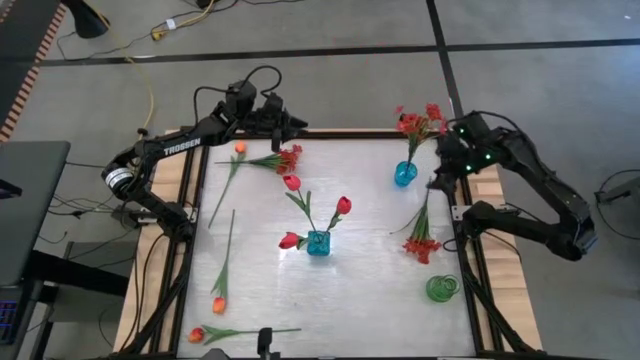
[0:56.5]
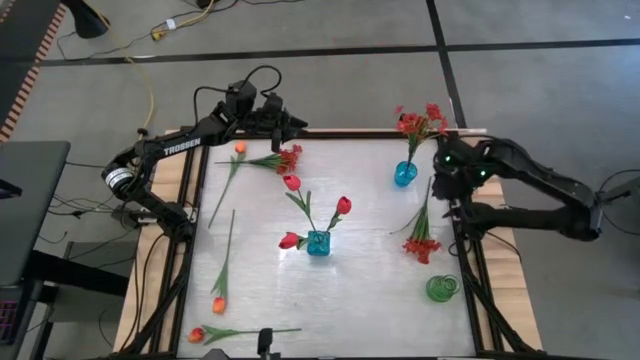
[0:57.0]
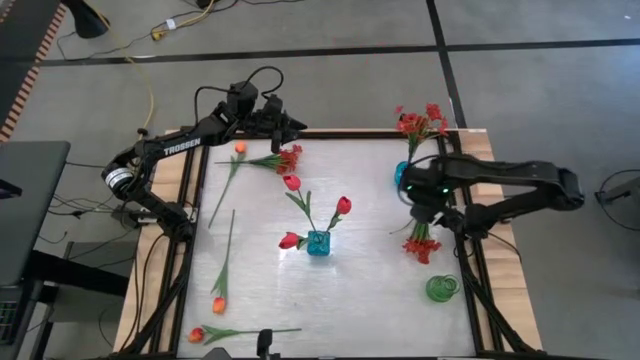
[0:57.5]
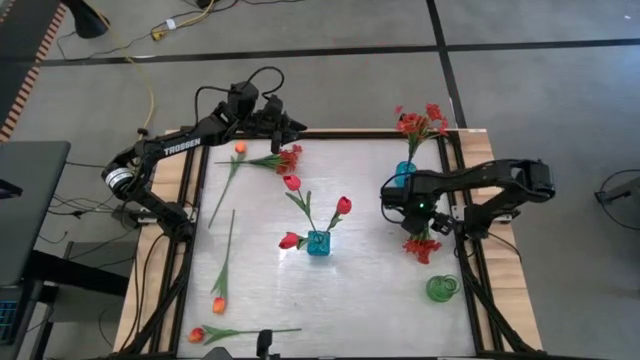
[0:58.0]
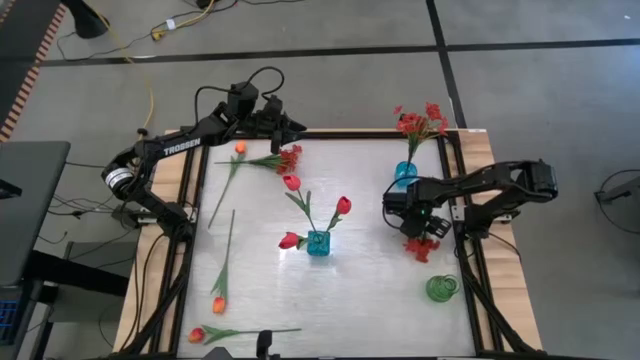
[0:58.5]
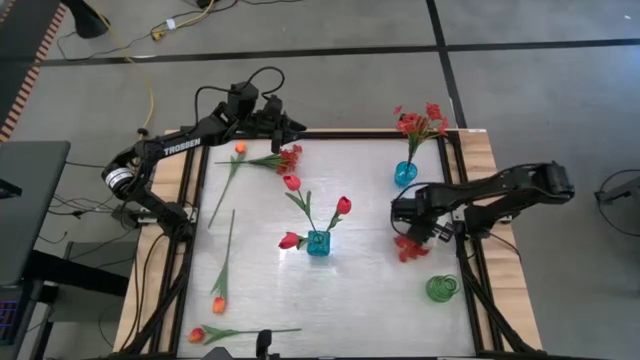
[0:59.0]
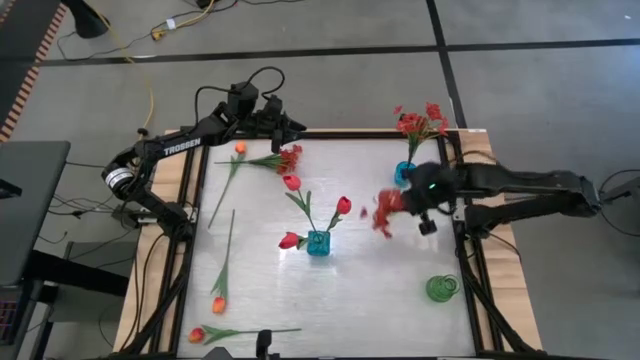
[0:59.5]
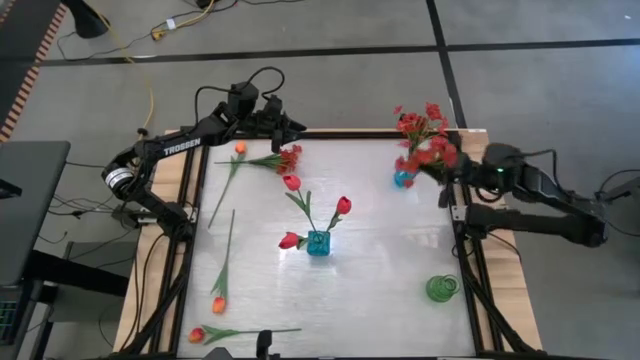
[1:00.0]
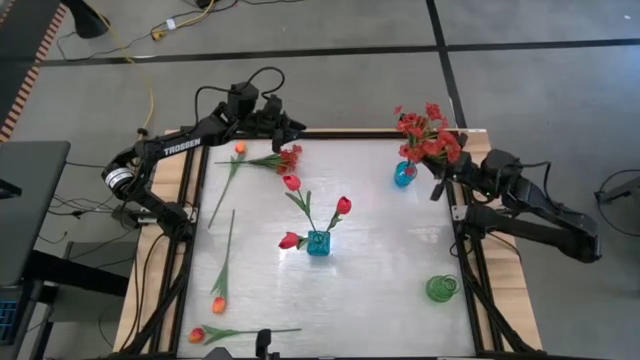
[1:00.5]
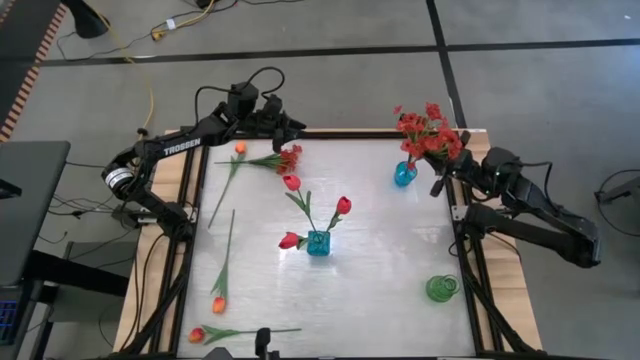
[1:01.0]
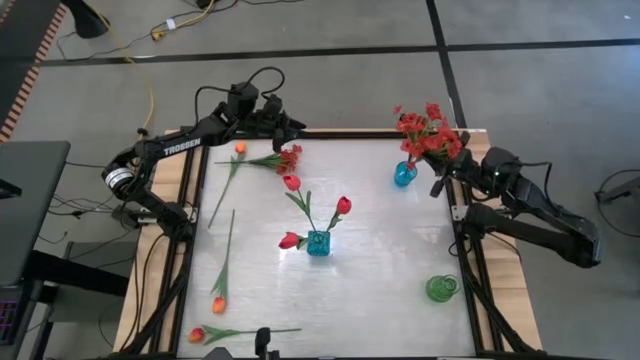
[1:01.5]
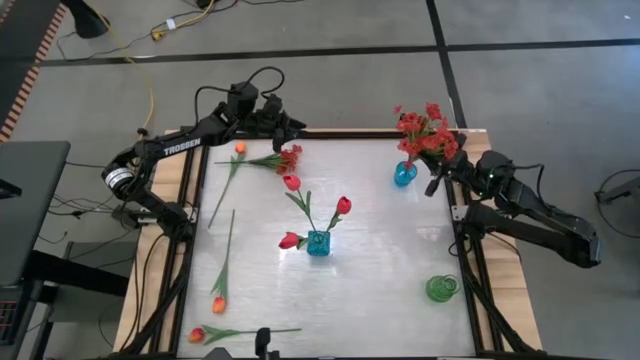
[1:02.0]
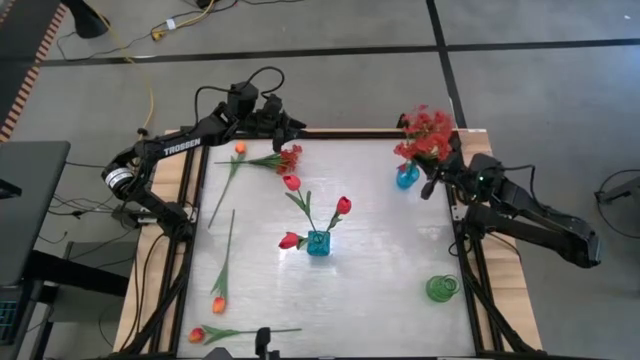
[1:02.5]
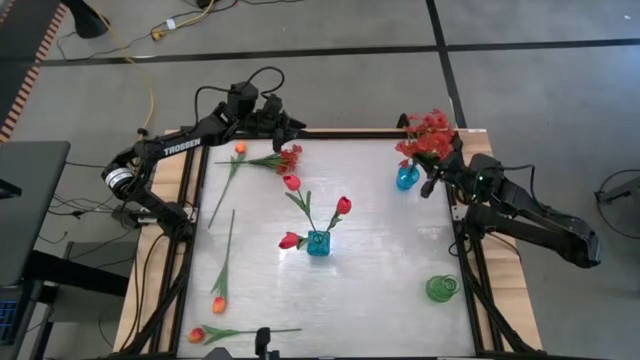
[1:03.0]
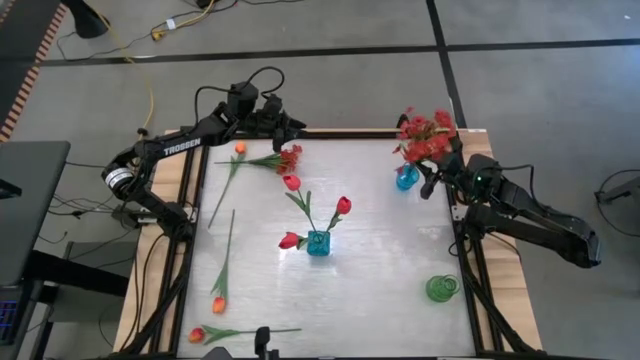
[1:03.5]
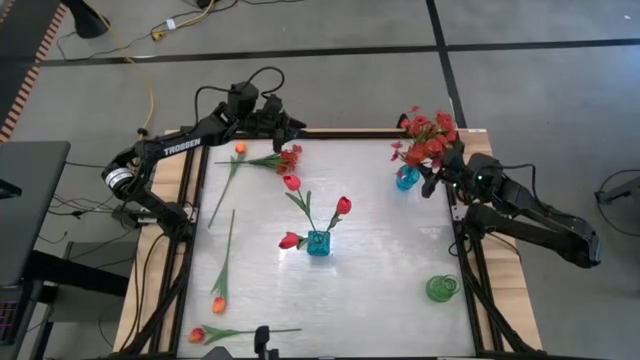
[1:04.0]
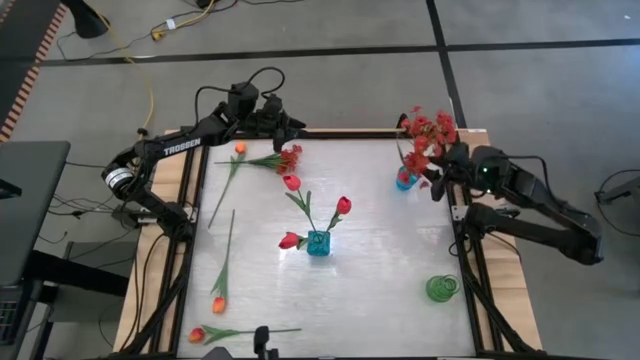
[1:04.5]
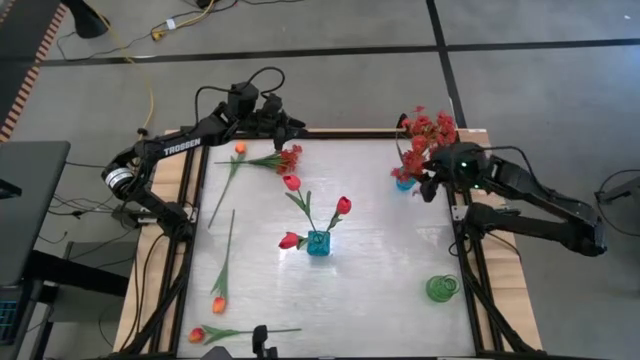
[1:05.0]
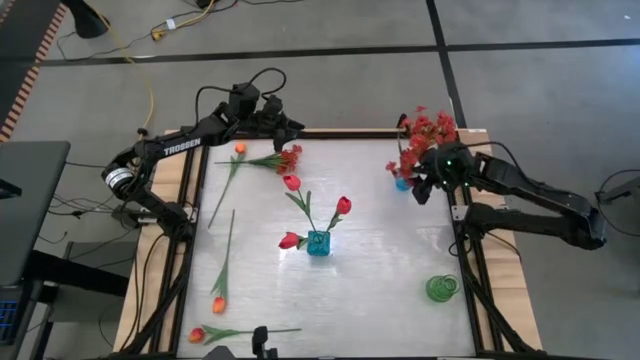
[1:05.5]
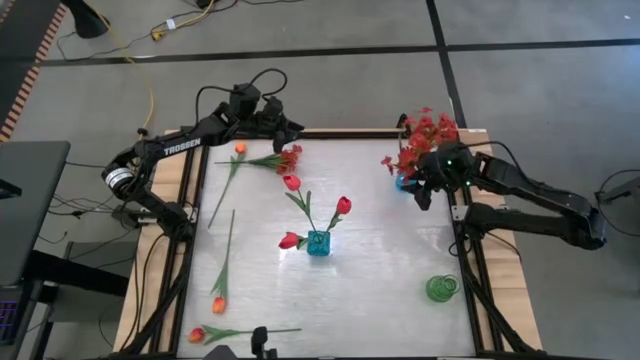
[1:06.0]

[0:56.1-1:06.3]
Task: Sort flowers into vase by color
Put the right orange flowers into the top blue vase

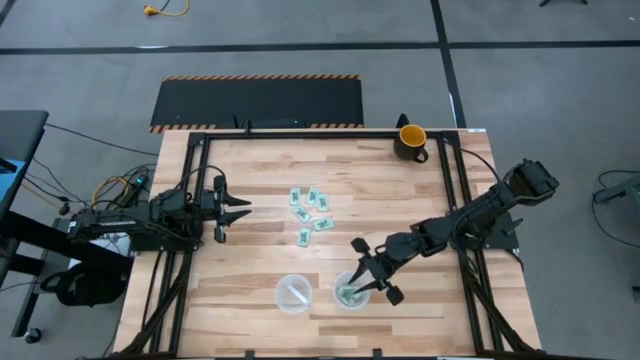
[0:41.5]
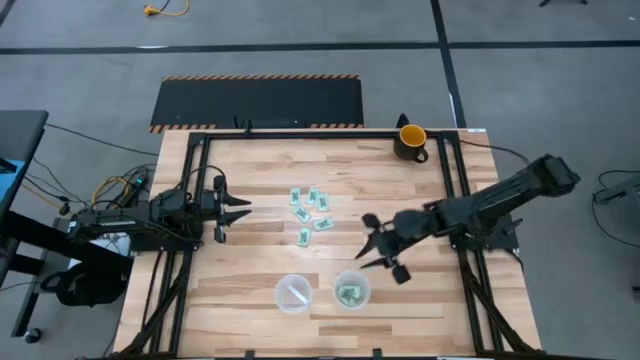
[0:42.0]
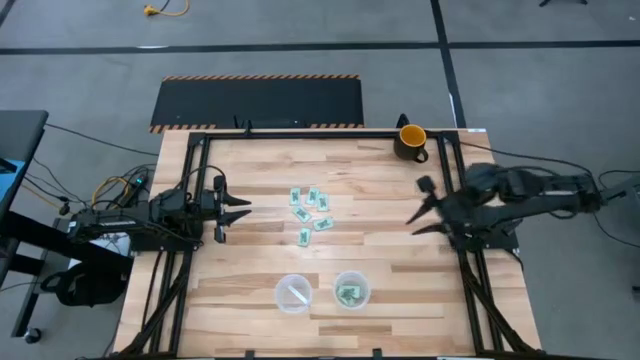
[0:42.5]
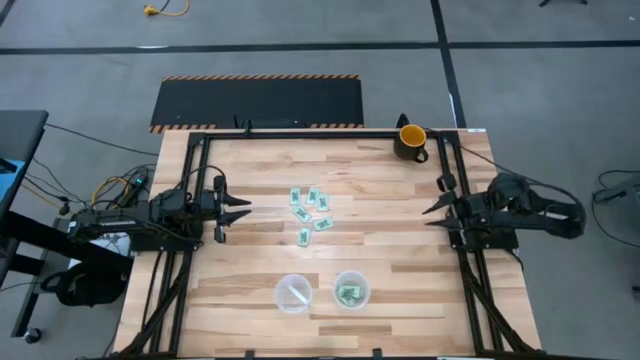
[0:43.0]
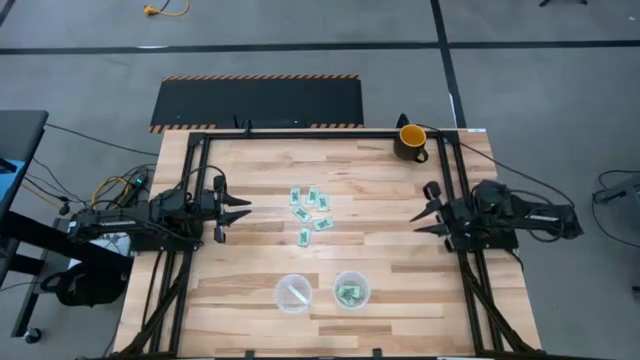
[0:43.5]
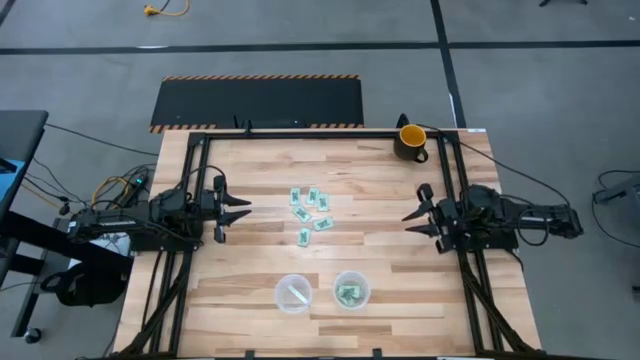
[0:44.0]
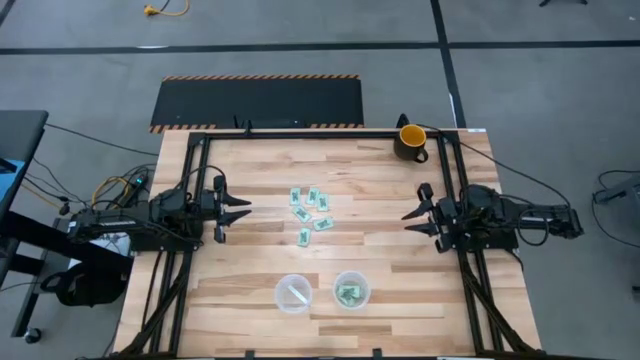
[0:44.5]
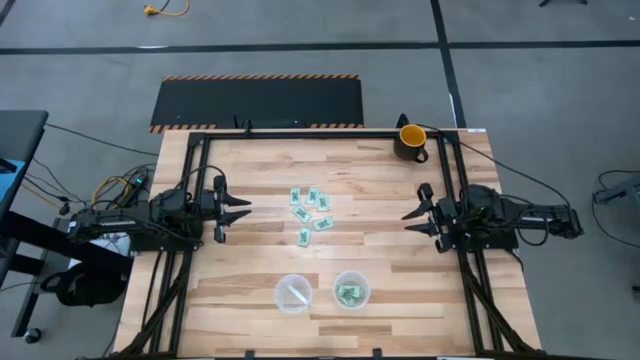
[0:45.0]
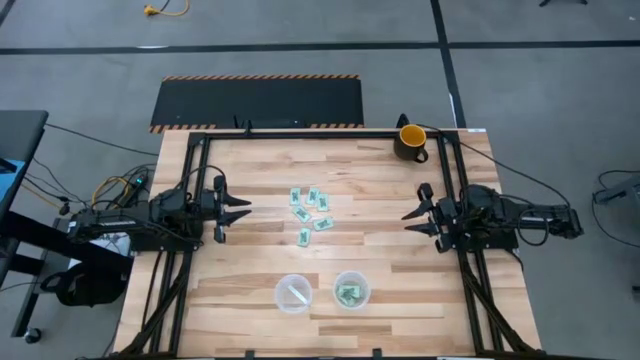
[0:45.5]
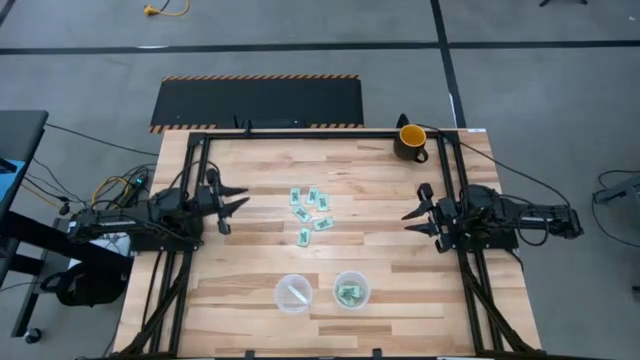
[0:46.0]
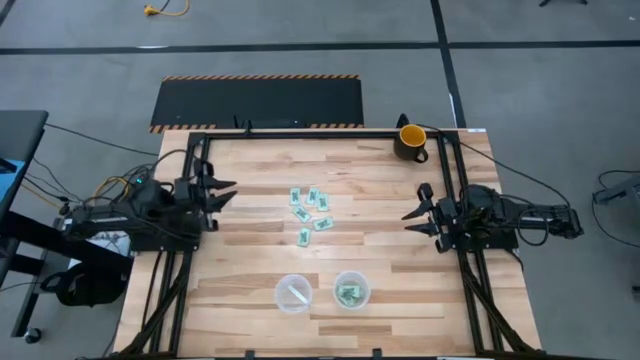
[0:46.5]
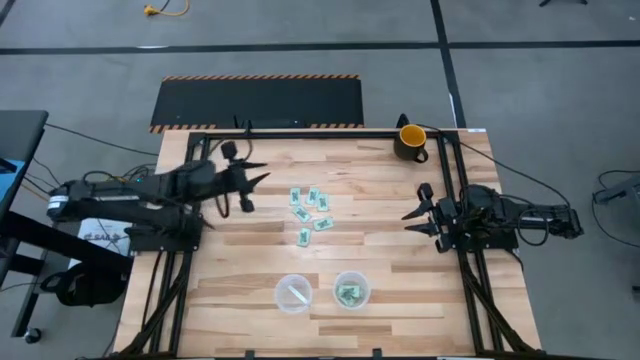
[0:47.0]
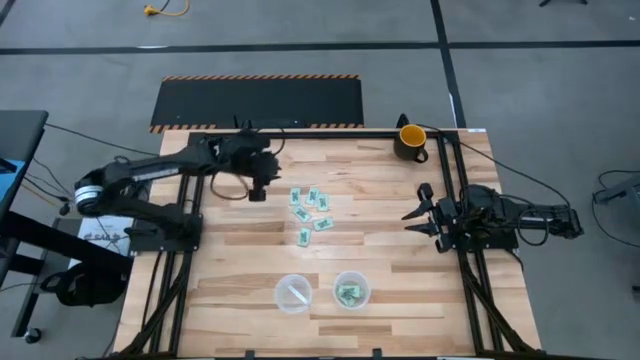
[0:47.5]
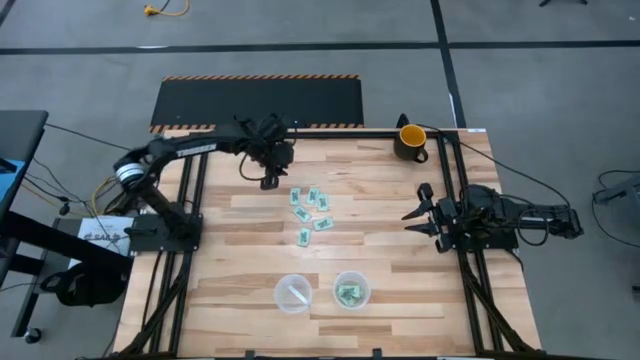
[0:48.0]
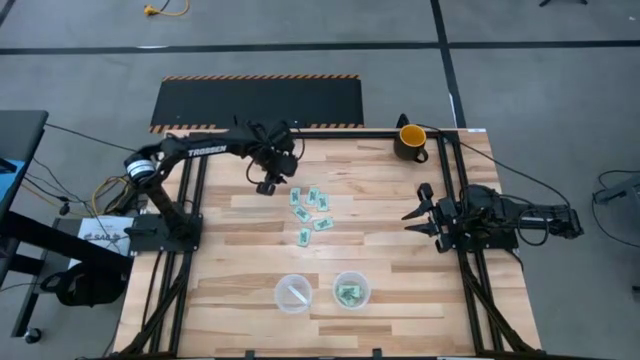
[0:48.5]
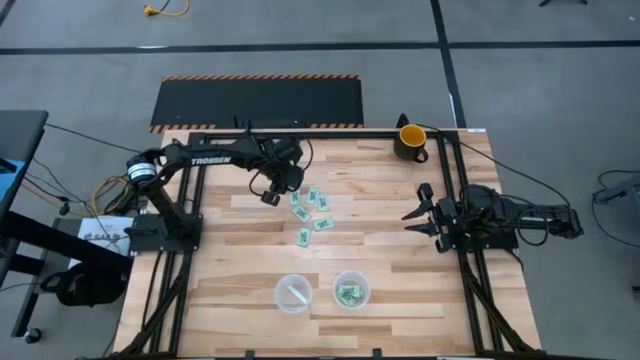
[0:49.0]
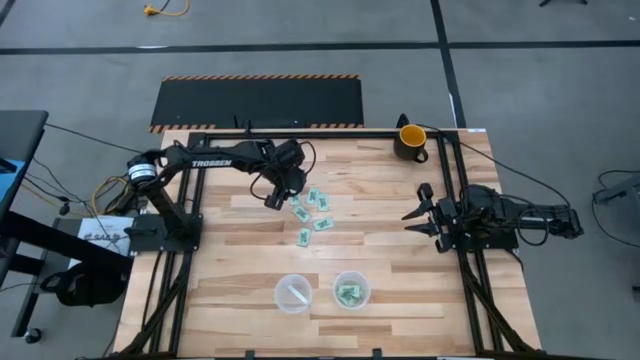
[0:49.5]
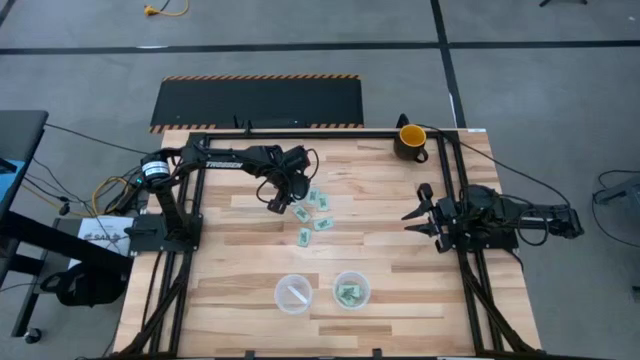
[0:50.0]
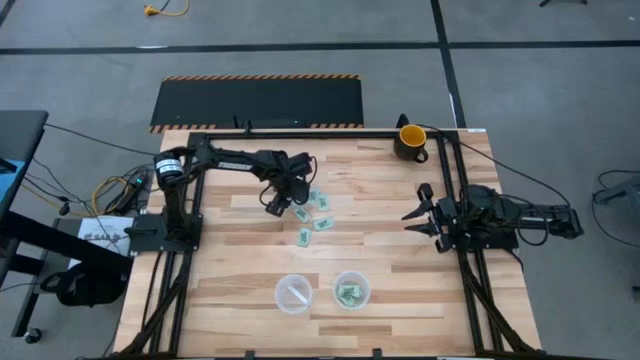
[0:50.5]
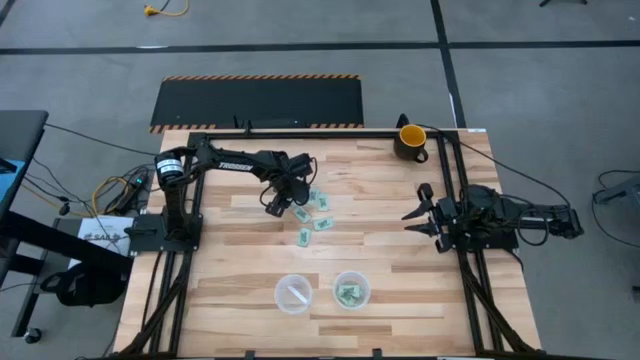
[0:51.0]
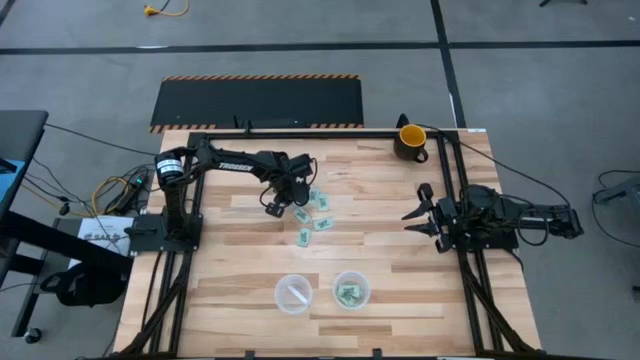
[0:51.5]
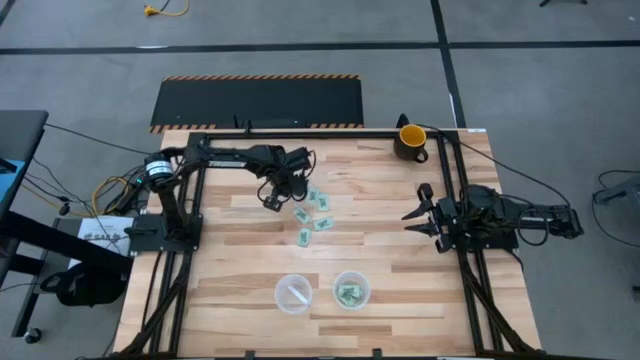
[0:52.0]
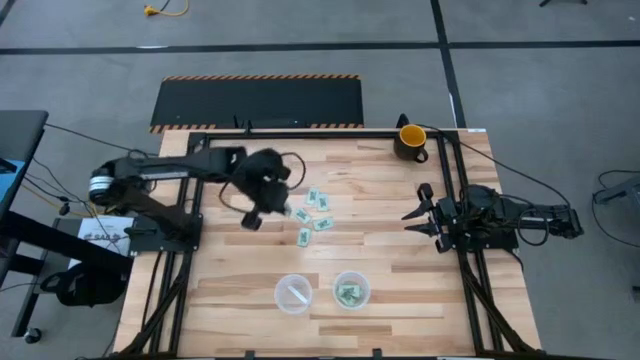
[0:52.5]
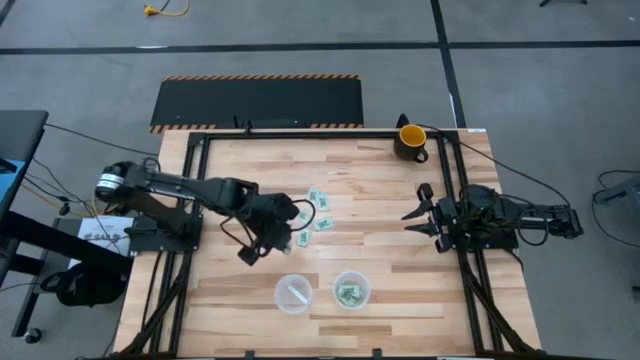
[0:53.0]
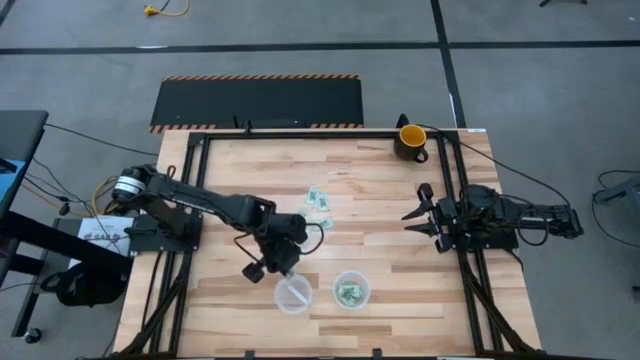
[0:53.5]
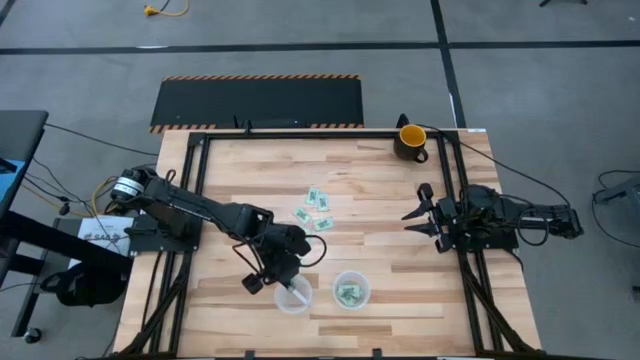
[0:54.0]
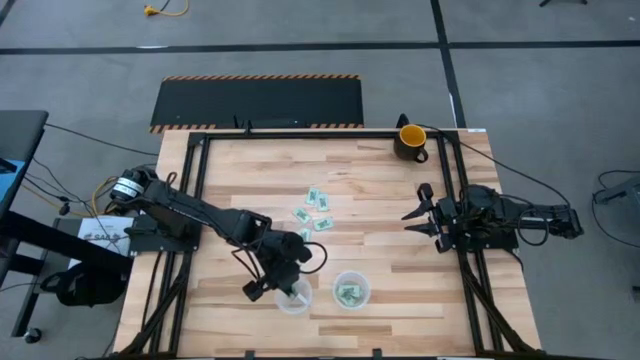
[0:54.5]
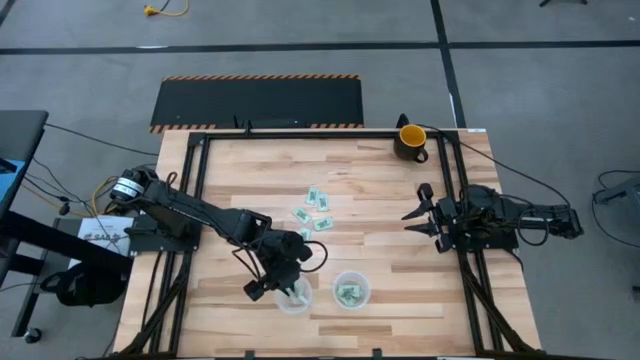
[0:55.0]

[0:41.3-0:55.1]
Task: Pick and place Stevia / Truvia into bins
Put the white stevia pack into the left transparent basket
